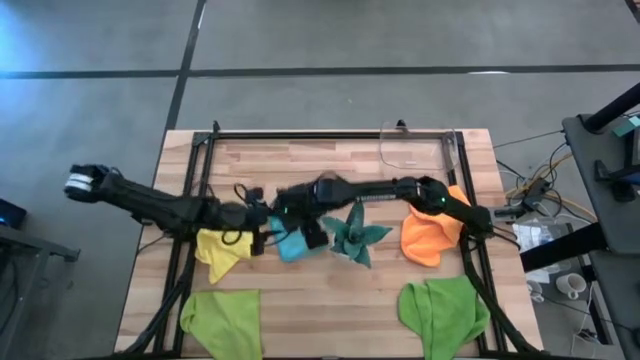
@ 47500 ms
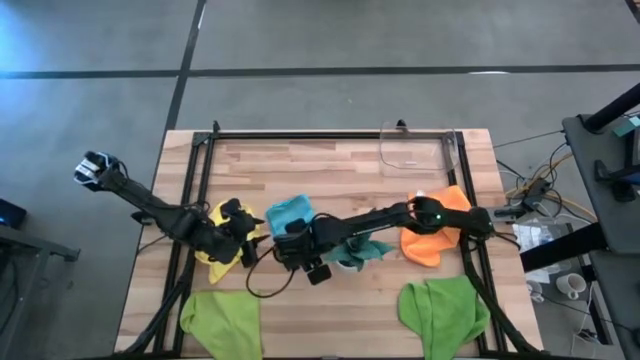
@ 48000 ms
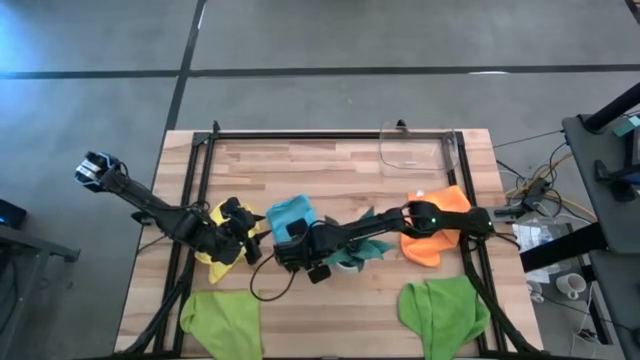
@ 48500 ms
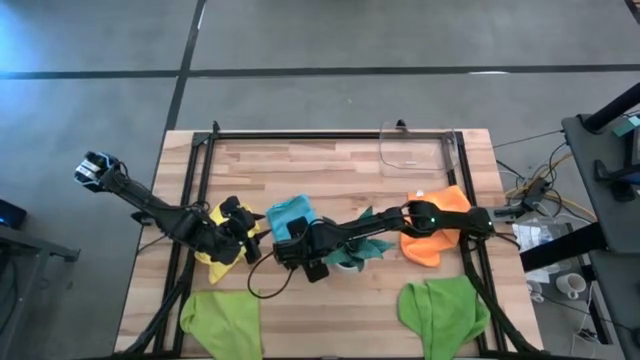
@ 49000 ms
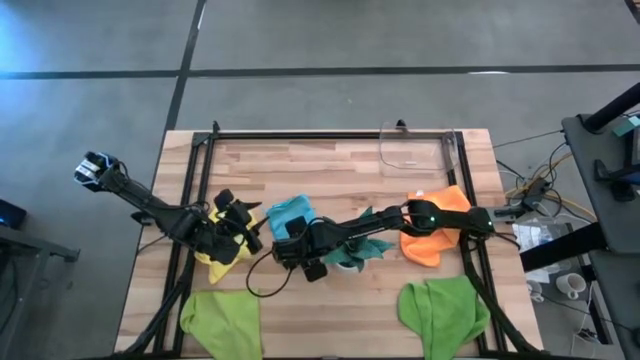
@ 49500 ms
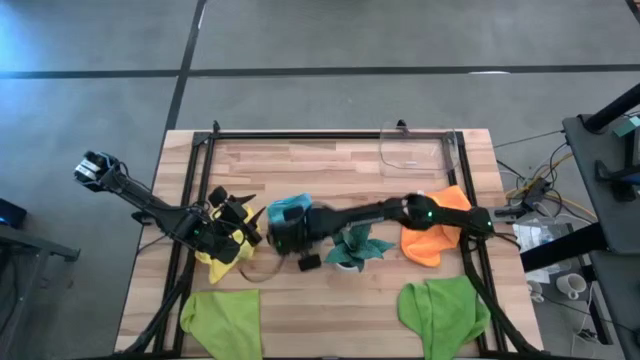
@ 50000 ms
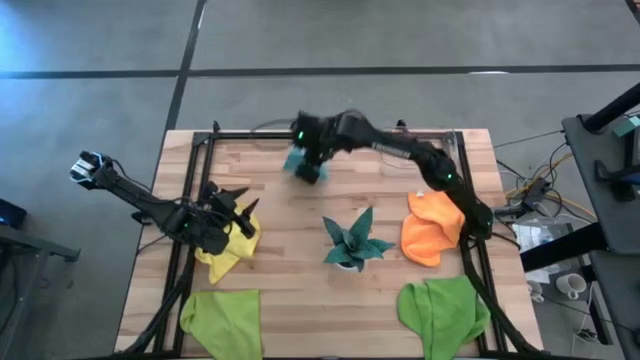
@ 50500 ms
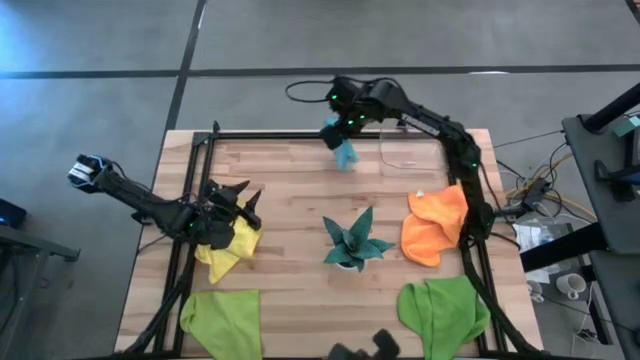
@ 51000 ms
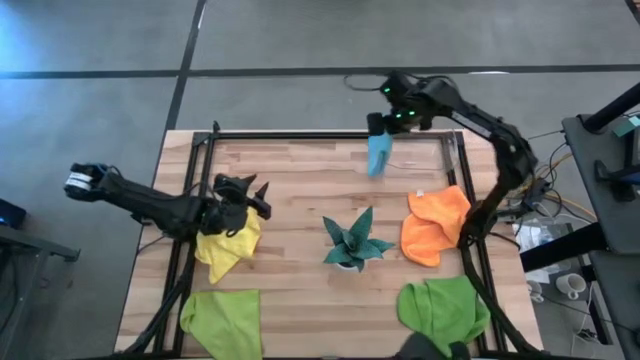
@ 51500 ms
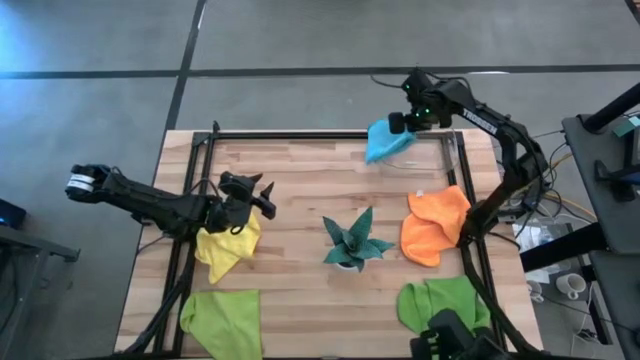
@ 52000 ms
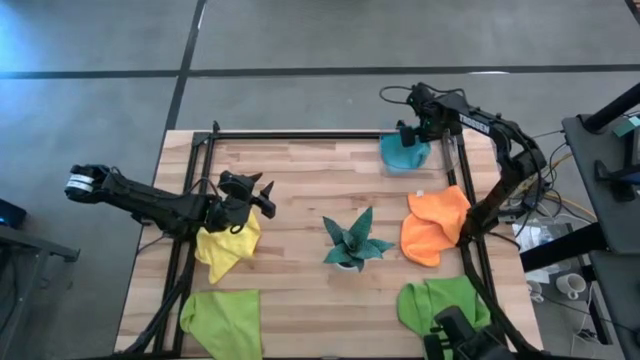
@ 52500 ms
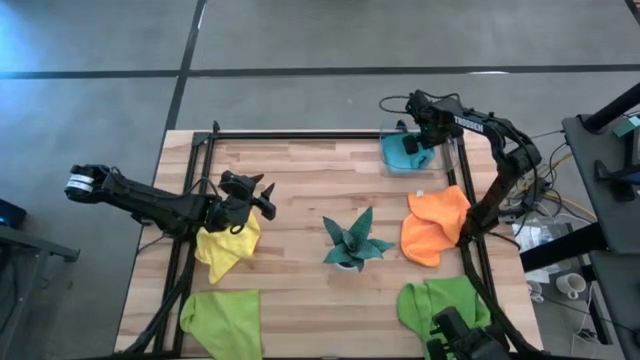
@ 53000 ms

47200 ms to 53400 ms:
Task: Fold microfiber towels
Put the blue microfiber cloth into the transparent bin

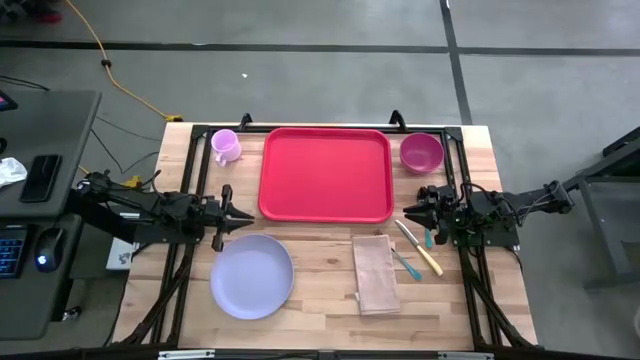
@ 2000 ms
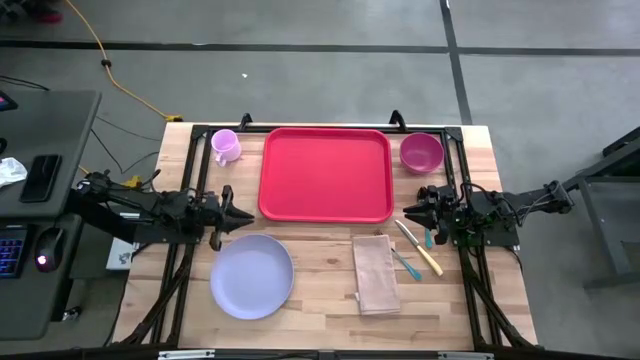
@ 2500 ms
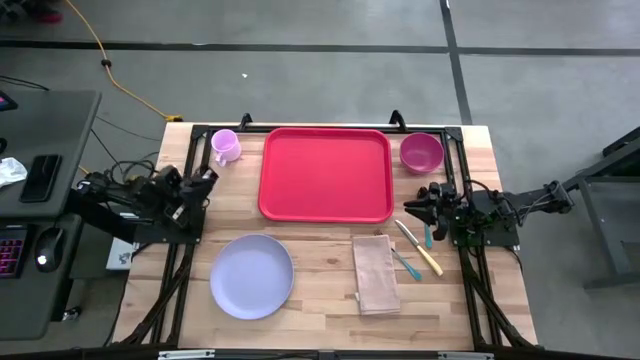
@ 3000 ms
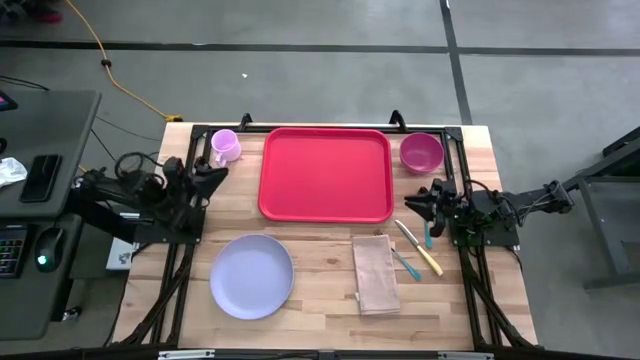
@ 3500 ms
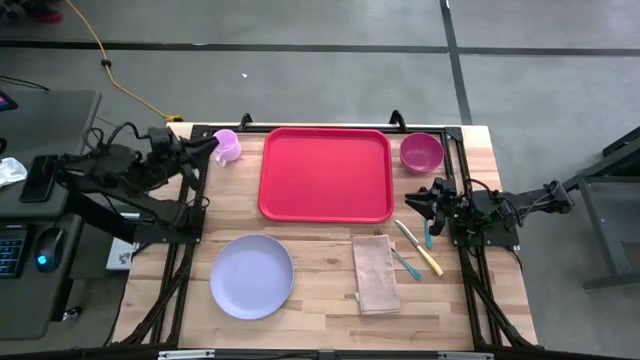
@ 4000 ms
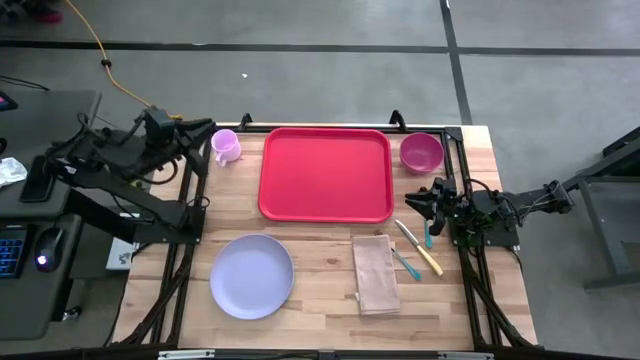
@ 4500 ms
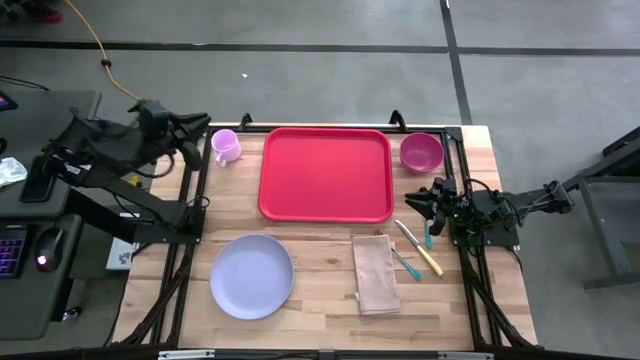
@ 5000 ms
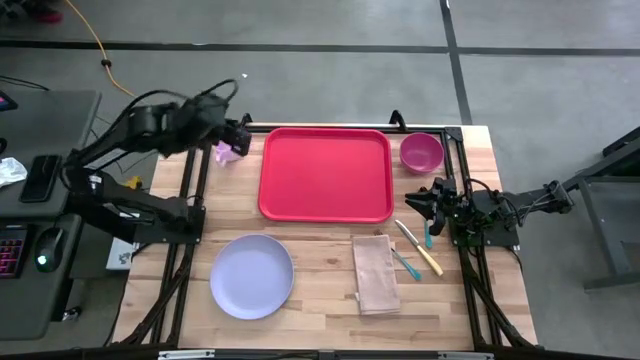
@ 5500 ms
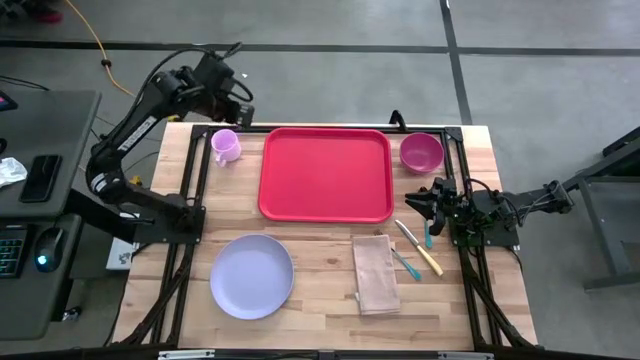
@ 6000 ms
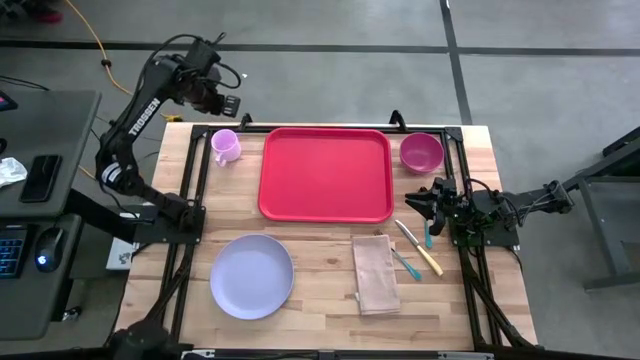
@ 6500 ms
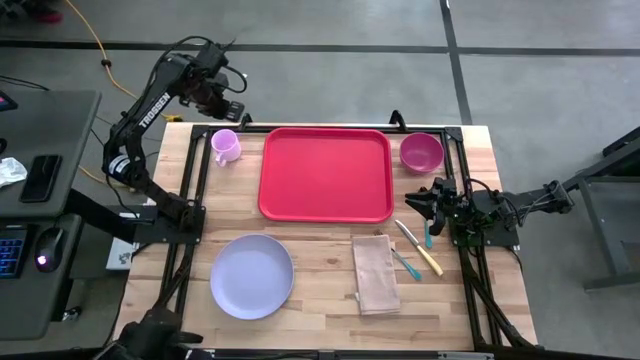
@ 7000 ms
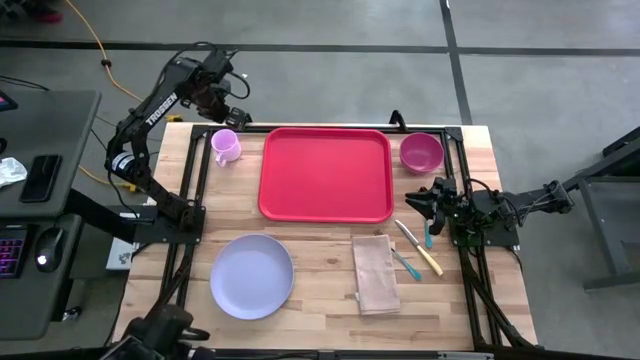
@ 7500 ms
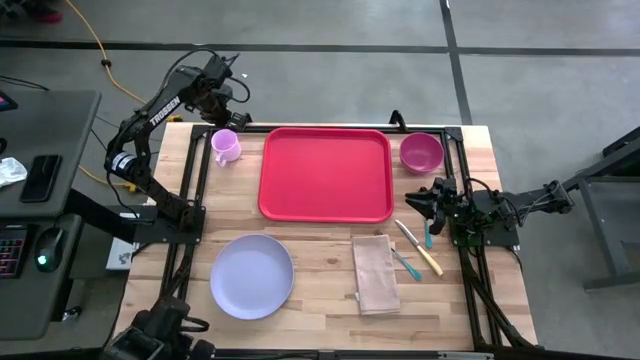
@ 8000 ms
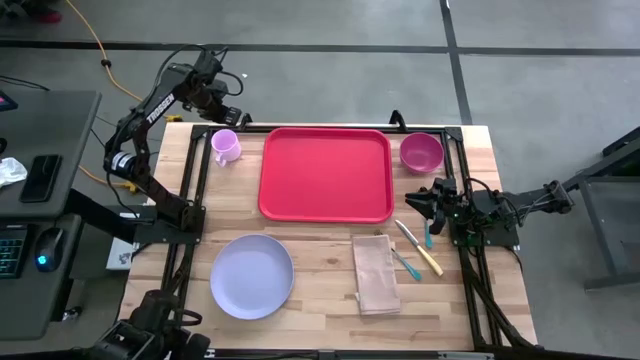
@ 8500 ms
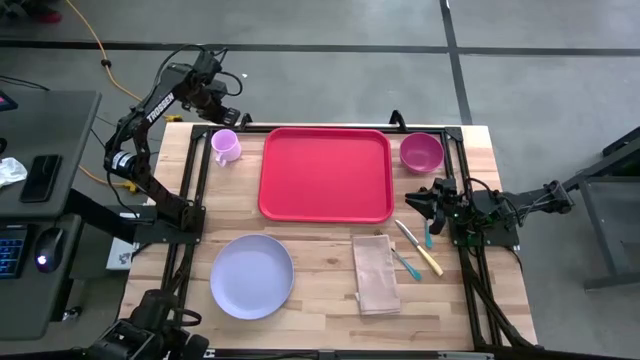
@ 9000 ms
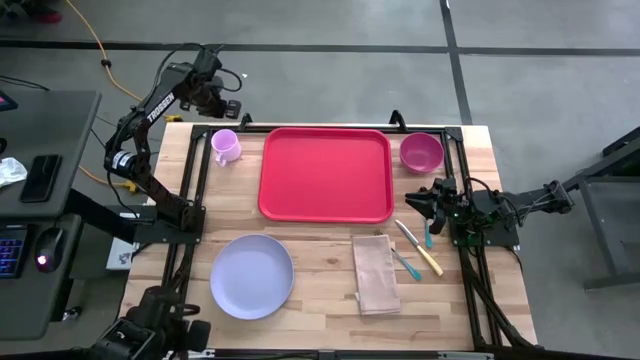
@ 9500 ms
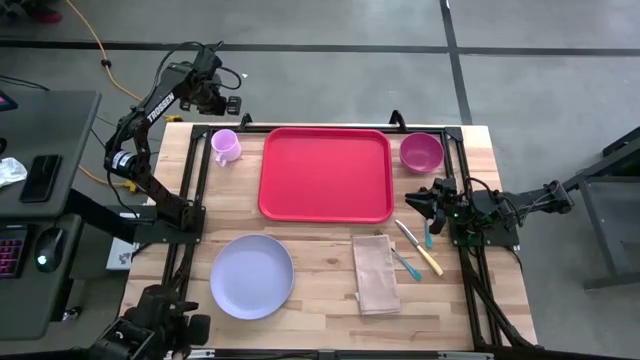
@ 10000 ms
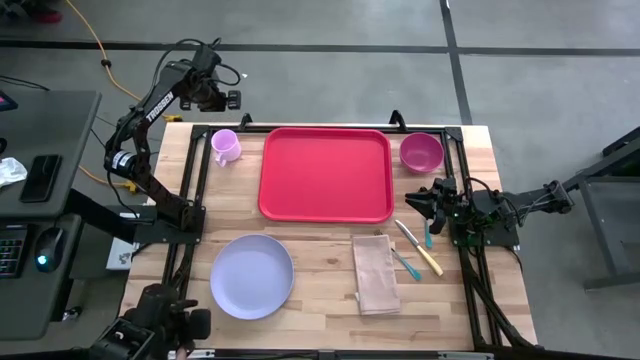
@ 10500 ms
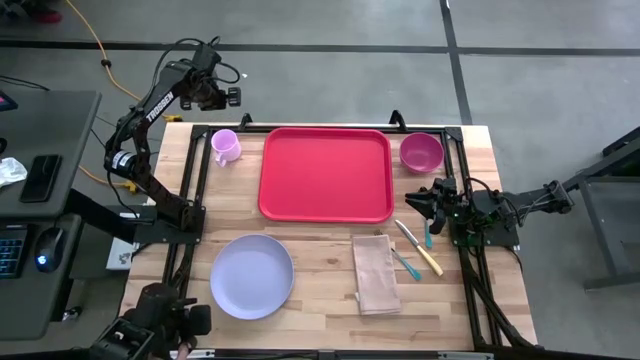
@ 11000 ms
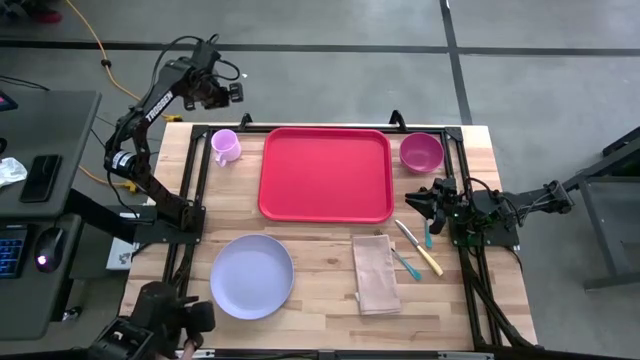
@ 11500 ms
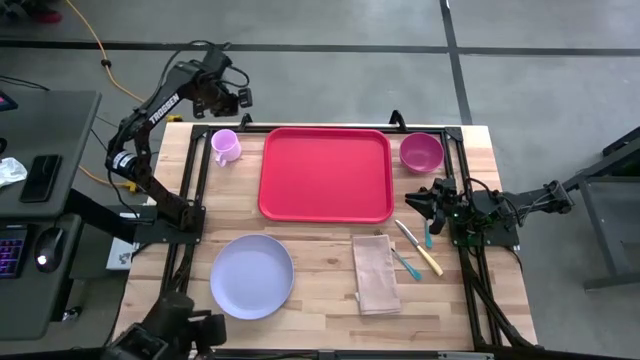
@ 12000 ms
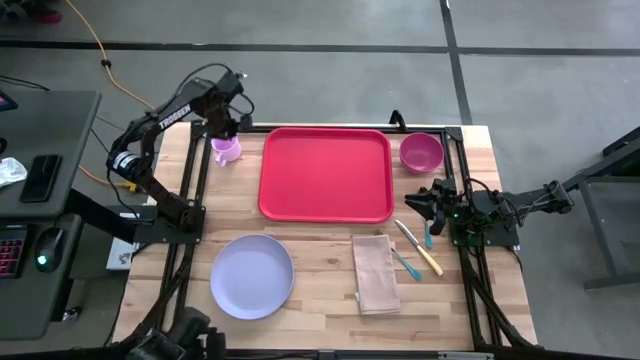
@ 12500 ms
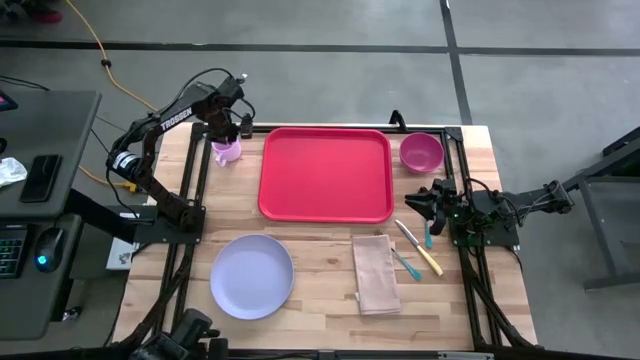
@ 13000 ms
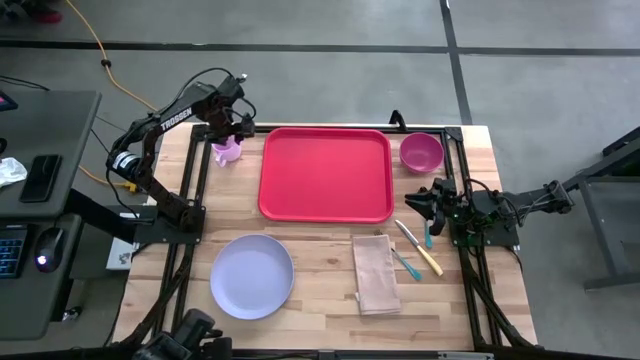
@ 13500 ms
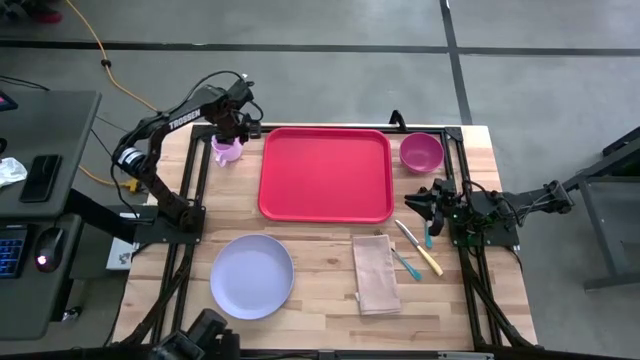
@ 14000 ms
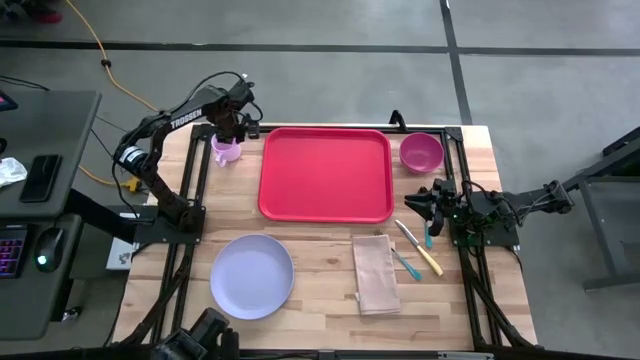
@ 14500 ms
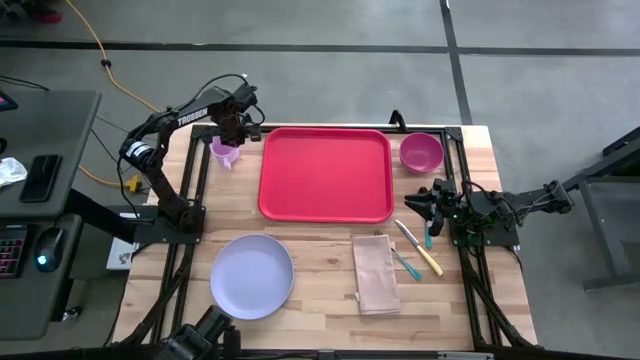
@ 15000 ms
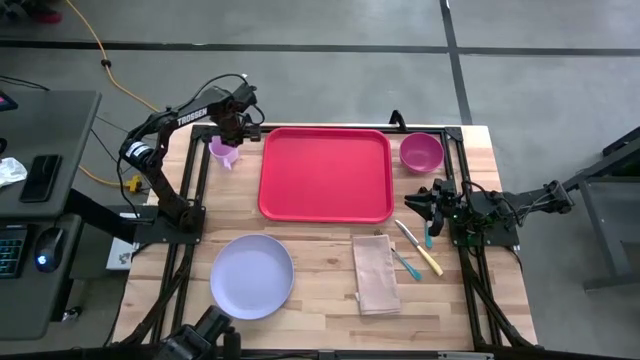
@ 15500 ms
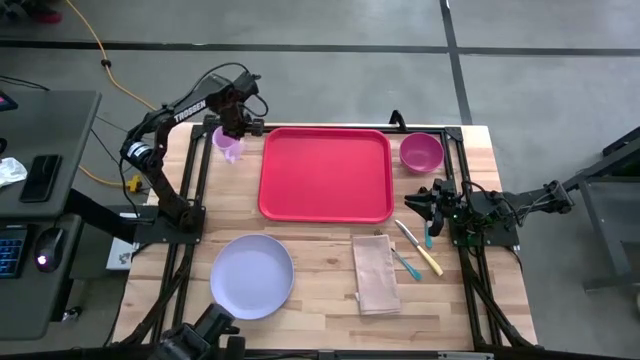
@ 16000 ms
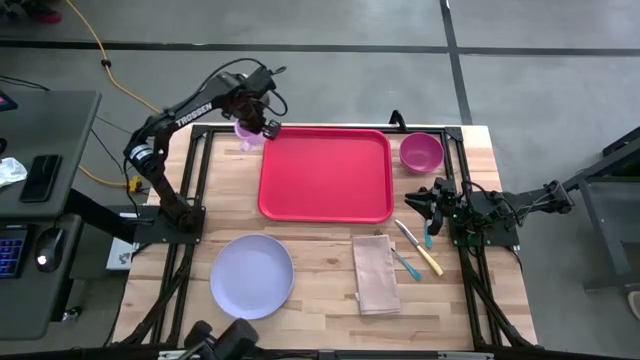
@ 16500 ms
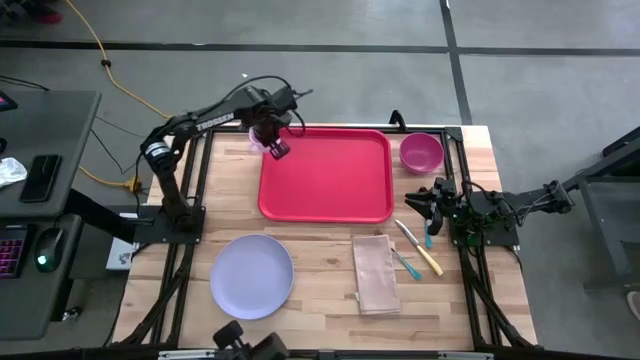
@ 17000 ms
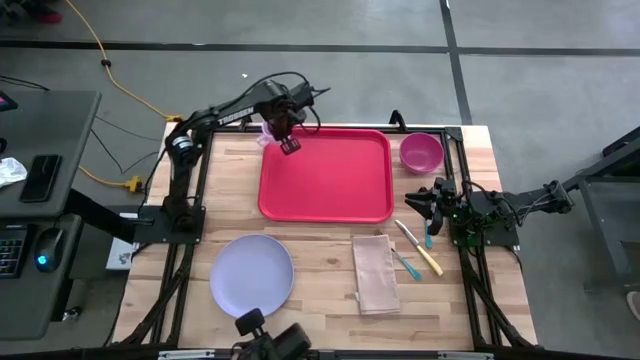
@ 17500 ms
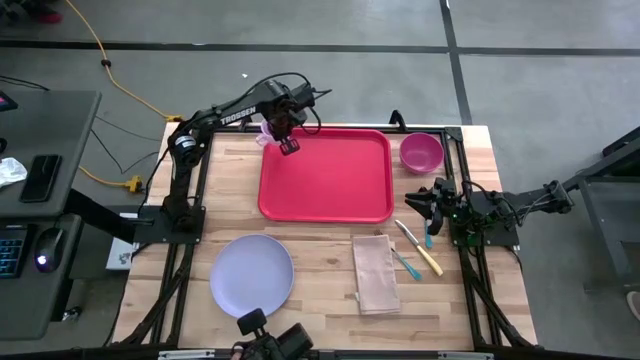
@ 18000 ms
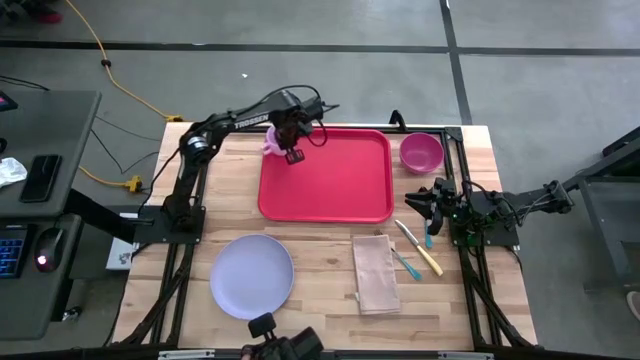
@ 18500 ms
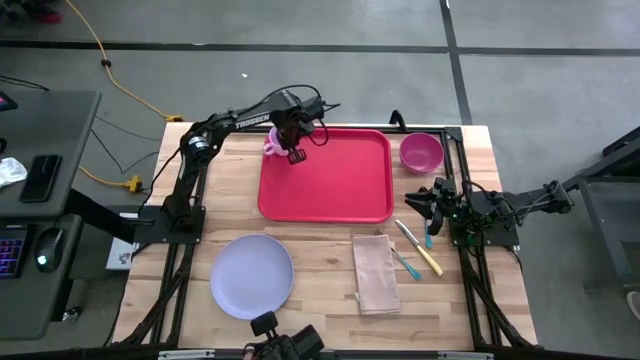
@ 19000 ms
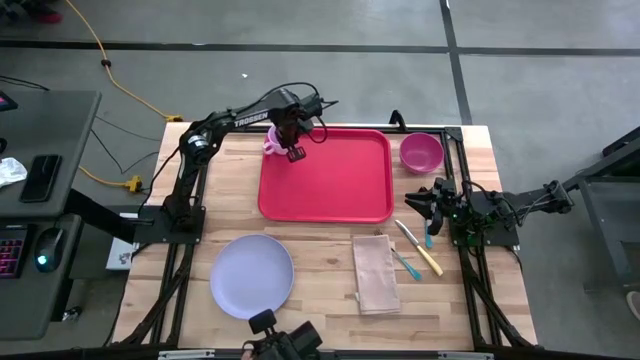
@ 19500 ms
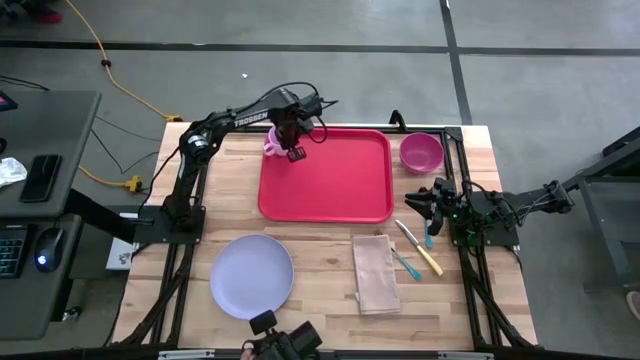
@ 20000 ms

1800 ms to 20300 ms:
Task: Set up tray
Put the pink mug on the tray
